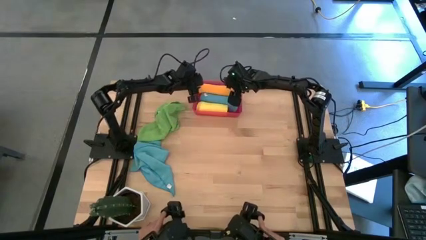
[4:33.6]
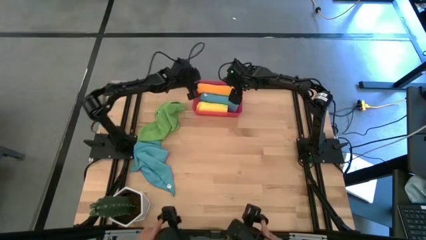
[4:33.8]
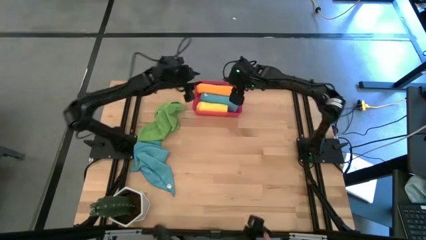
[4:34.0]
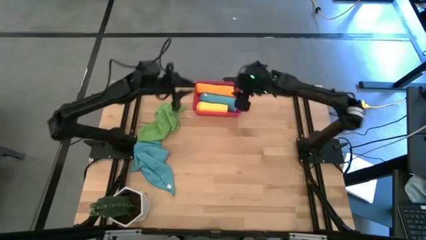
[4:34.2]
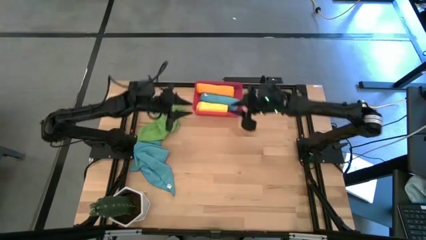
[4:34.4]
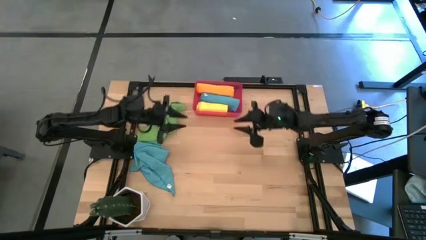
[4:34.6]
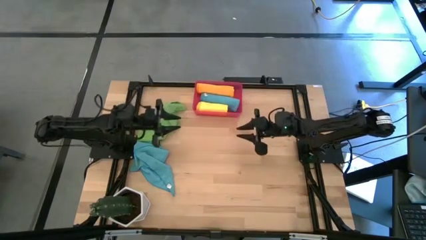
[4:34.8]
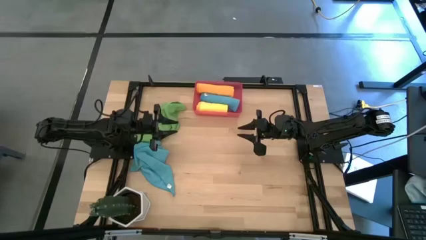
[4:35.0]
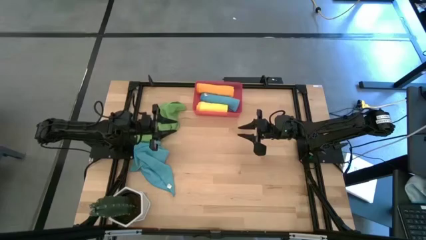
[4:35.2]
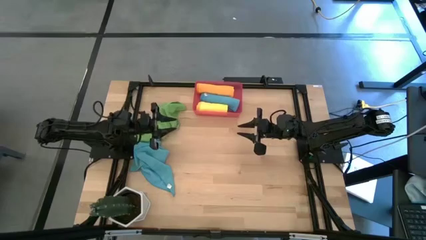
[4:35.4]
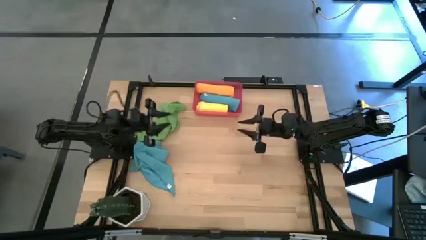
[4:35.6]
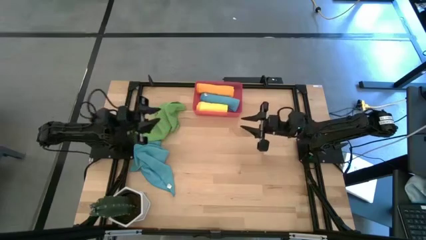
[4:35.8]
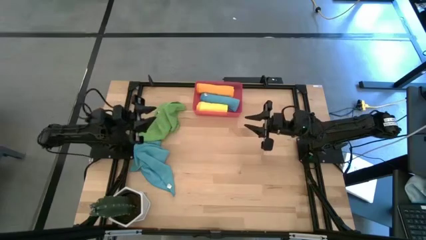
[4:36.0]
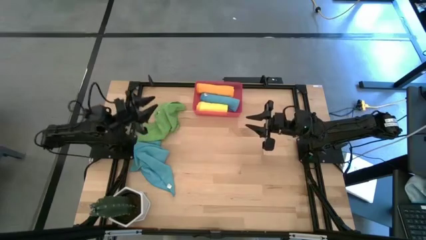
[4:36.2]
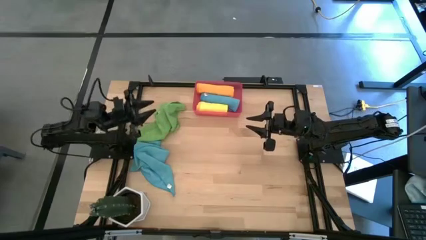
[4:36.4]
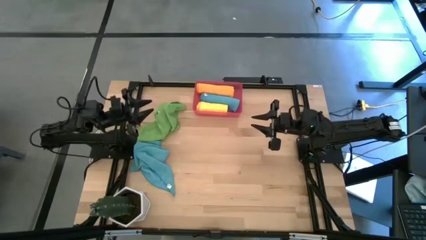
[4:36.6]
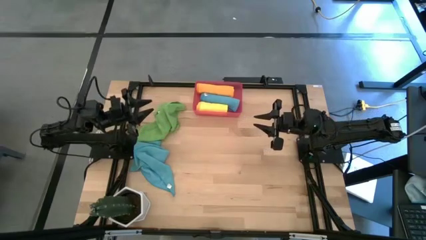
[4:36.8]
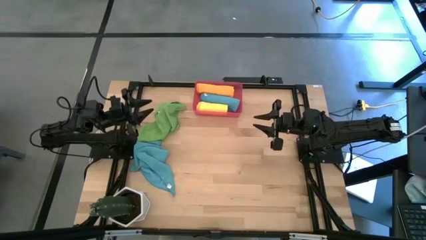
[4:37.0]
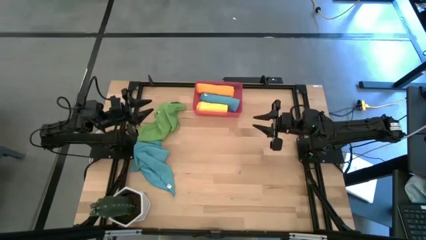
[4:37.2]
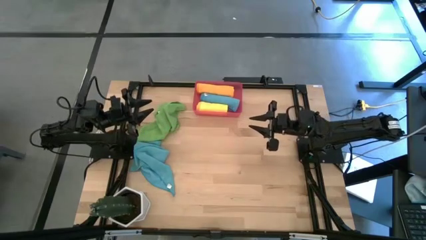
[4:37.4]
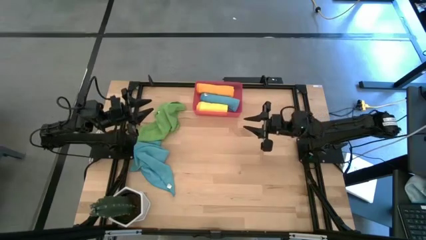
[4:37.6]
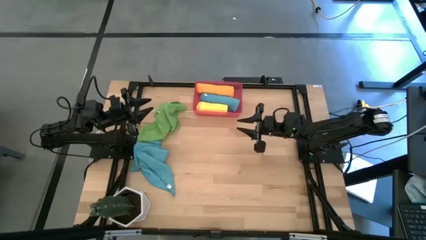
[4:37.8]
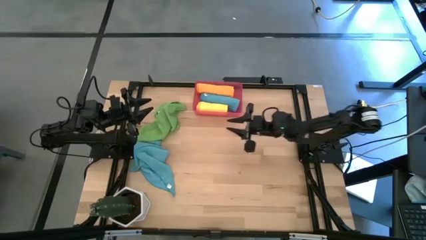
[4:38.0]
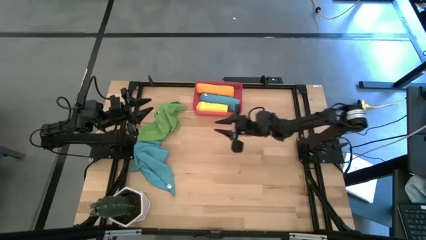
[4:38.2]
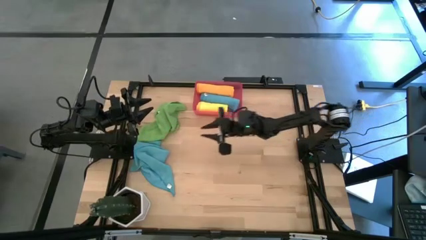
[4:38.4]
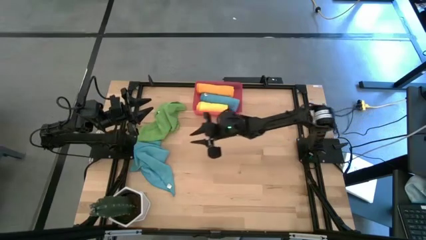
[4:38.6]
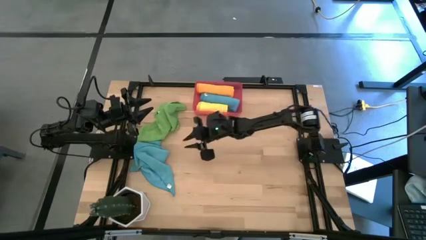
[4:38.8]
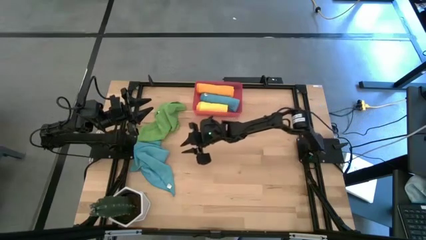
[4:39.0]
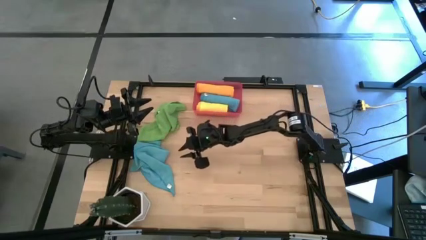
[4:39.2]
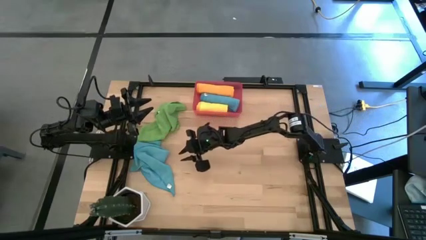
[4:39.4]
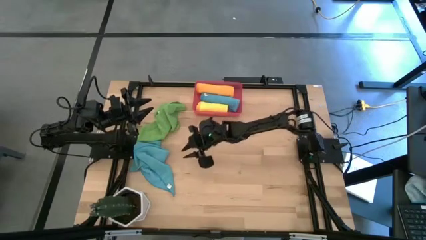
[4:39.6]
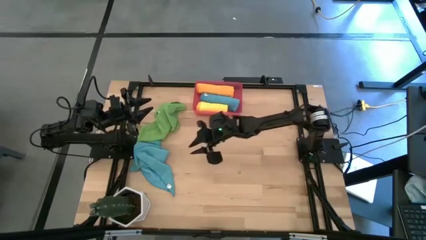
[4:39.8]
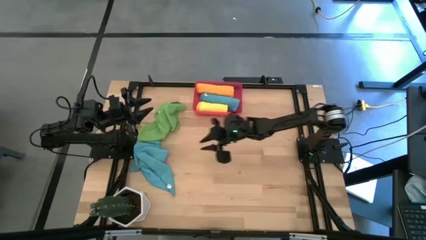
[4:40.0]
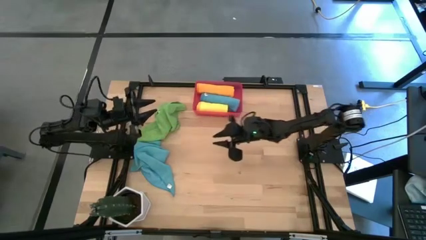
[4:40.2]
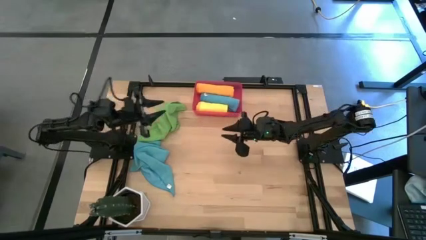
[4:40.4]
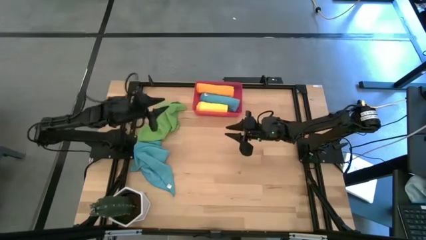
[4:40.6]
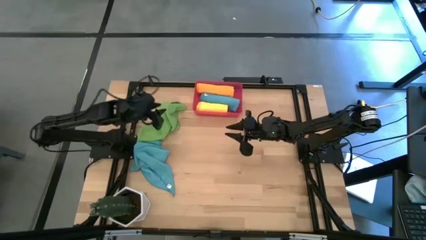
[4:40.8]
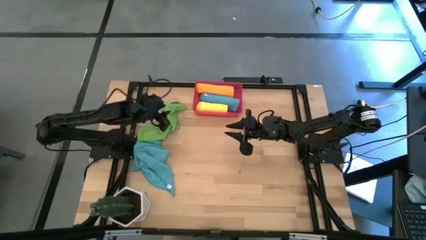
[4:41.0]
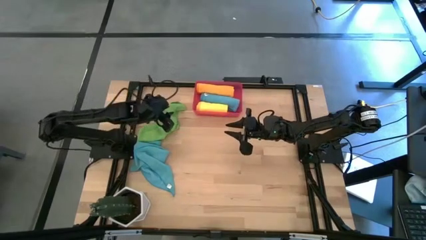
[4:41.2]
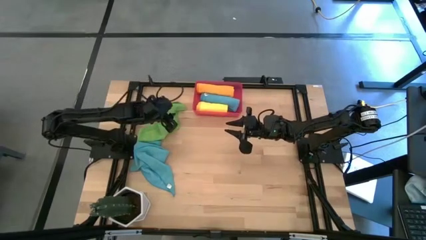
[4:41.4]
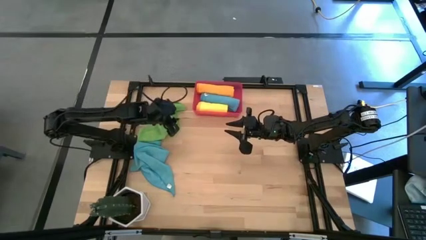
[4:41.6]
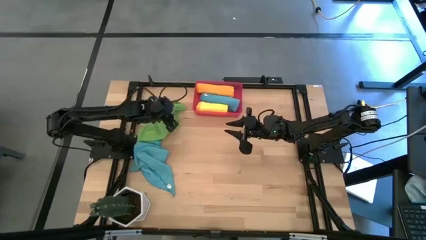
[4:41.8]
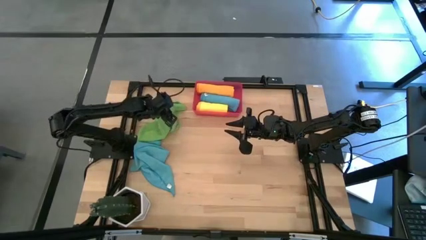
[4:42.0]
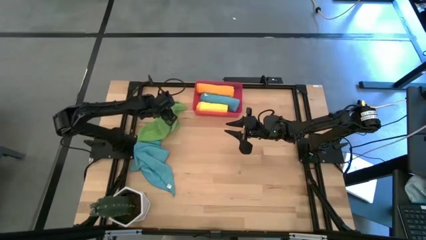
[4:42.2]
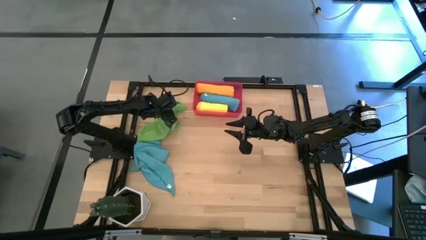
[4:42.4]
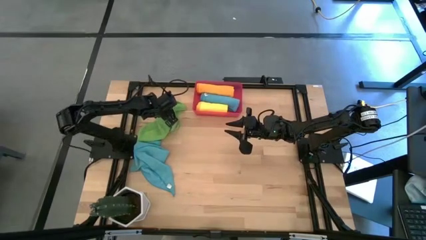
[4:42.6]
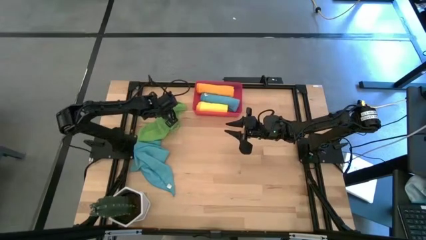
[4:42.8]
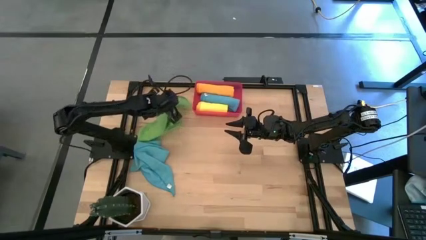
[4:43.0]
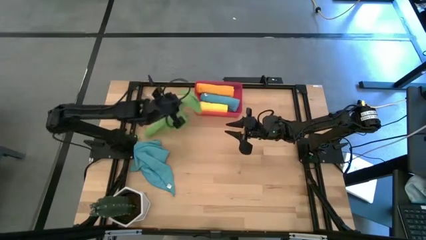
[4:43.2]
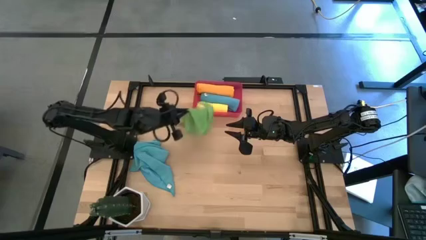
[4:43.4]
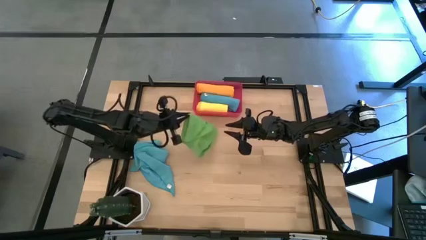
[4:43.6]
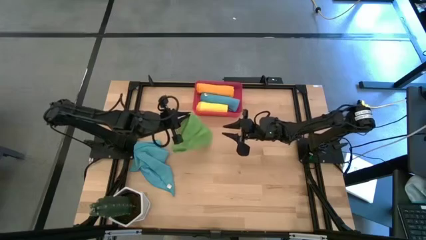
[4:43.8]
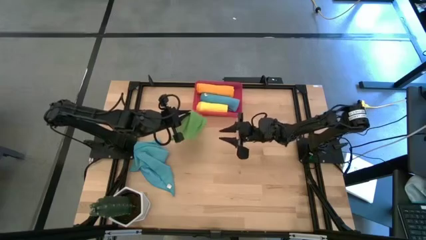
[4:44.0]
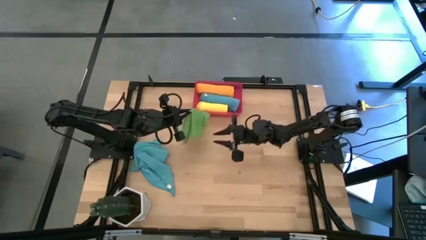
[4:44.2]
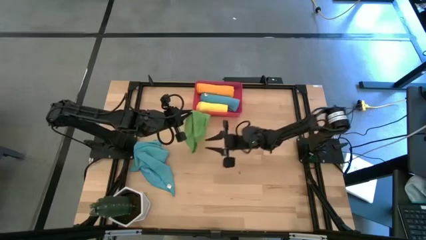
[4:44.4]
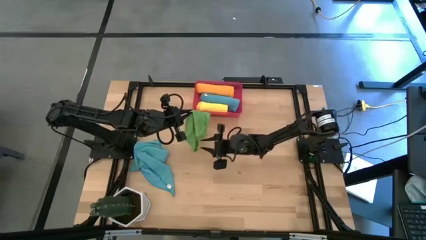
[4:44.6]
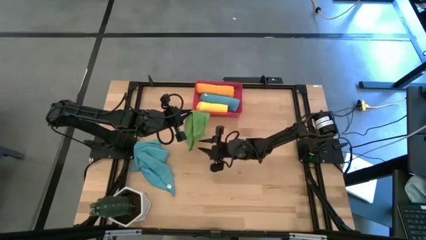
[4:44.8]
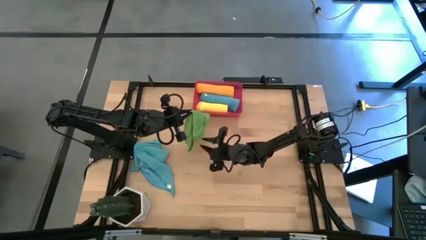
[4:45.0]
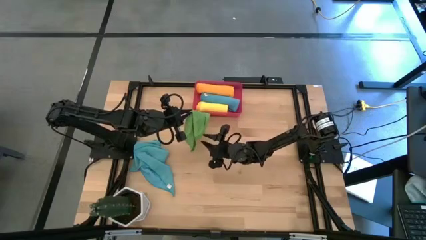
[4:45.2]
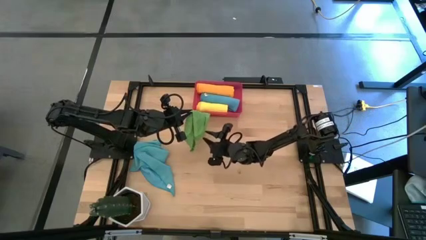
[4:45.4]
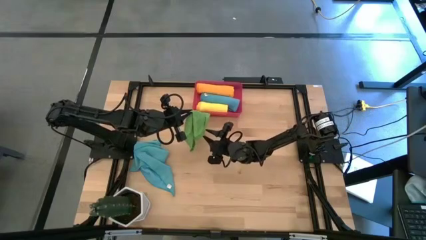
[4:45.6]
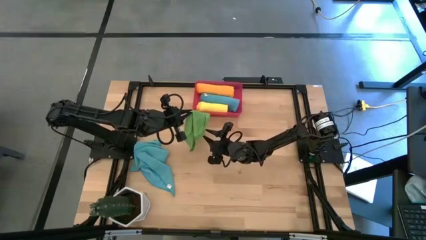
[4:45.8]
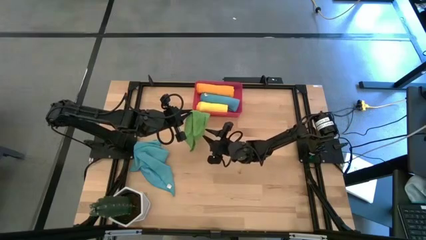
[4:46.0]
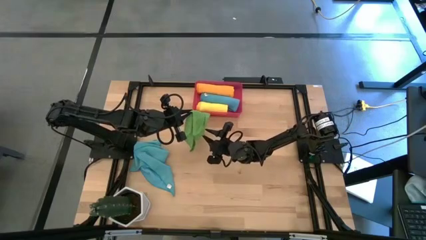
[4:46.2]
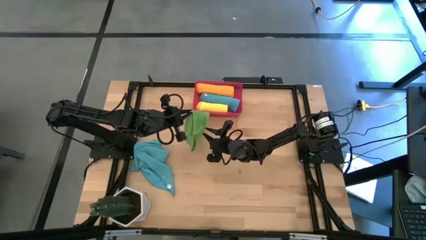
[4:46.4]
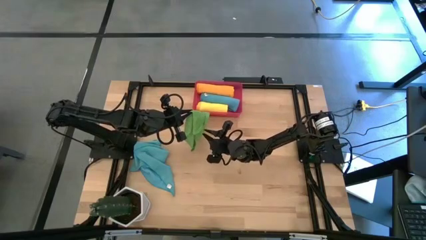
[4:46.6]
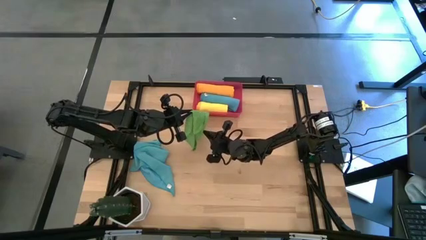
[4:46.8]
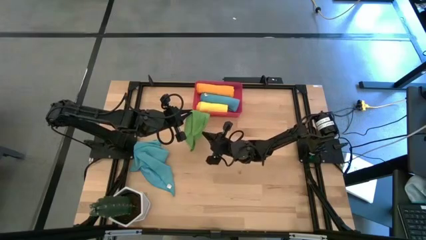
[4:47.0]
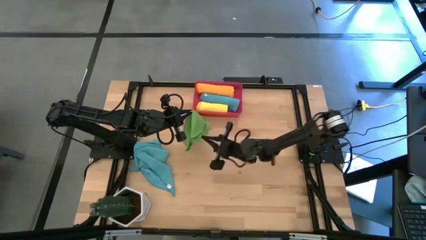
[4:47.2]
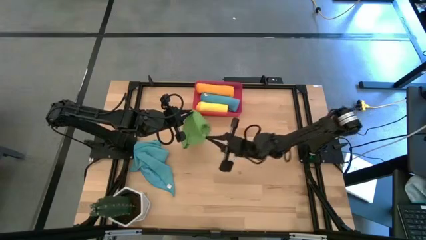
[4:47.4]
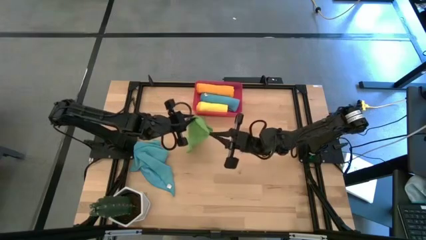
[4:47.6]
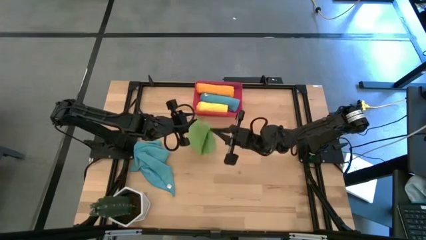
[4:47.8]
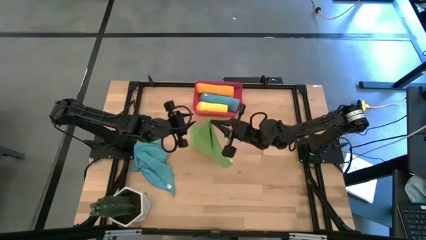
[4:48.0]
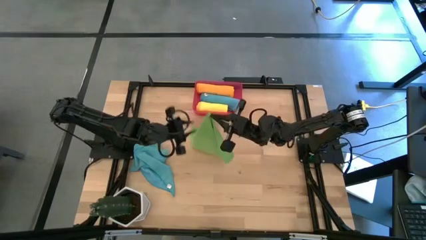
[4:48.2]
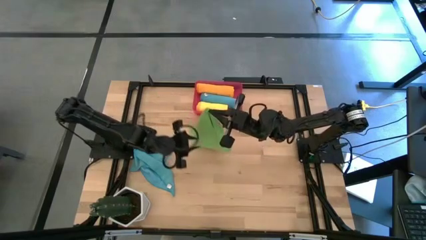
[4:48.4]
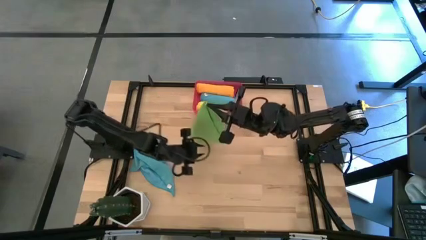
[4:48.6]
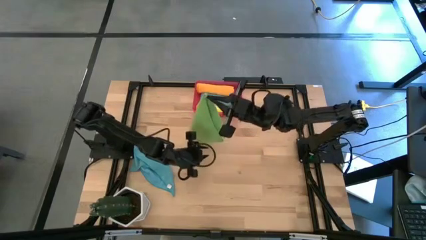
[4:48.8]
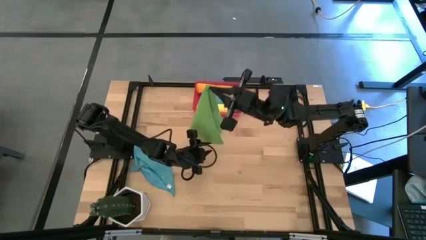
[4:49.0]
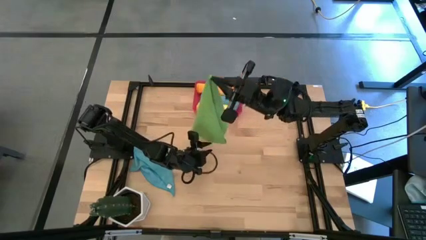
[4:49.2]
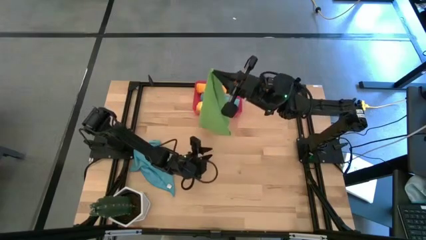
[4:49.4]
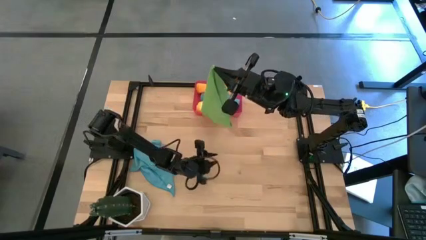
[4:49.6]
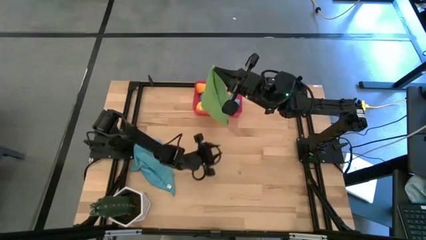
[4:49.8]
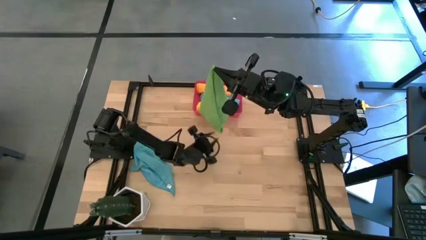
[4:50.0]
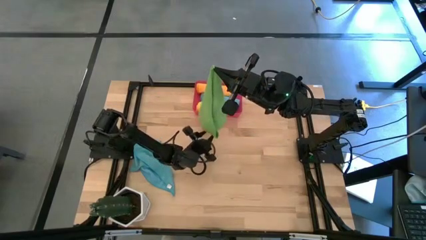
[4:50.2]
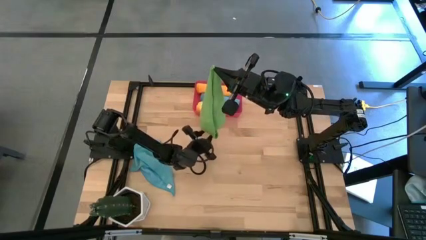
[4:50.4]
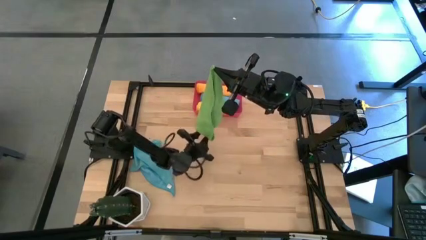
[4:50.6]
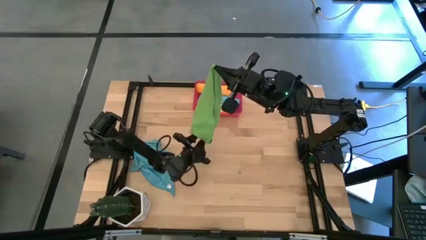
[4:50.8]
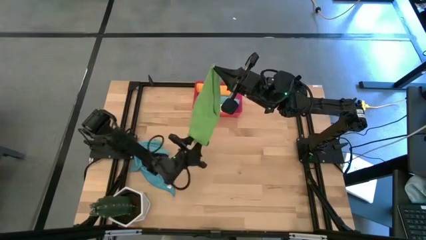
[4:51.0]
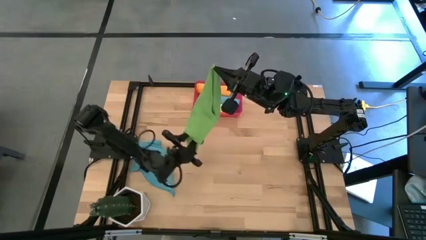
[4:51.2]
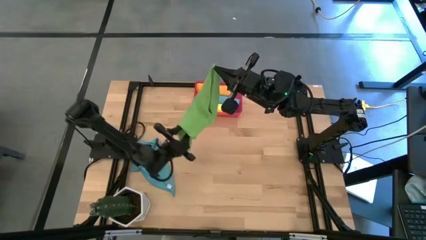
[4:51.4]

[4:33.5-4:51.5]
Task: Roll microfiber towels into tight, uniform cylinder then place into a basket
Roll the green microfiber cloth
